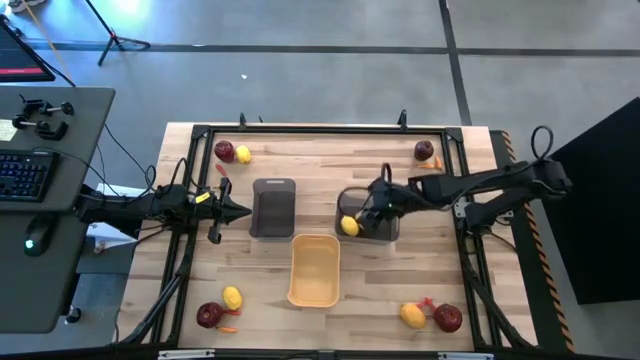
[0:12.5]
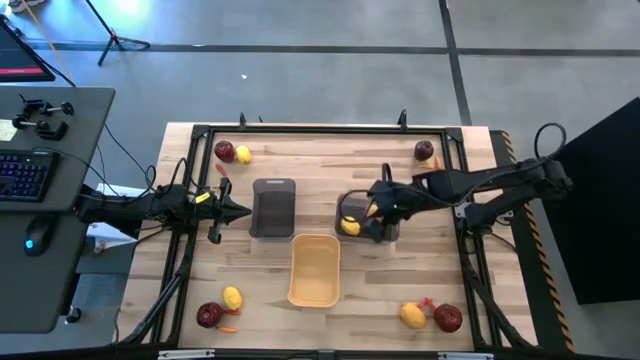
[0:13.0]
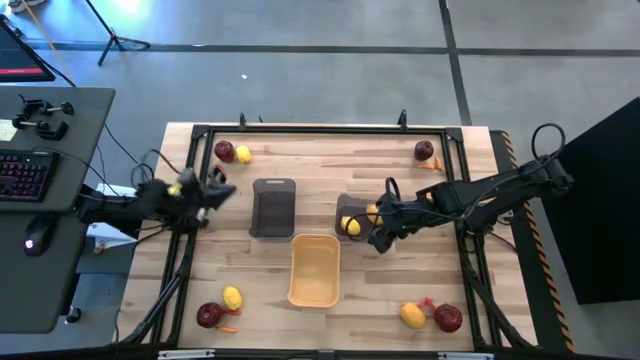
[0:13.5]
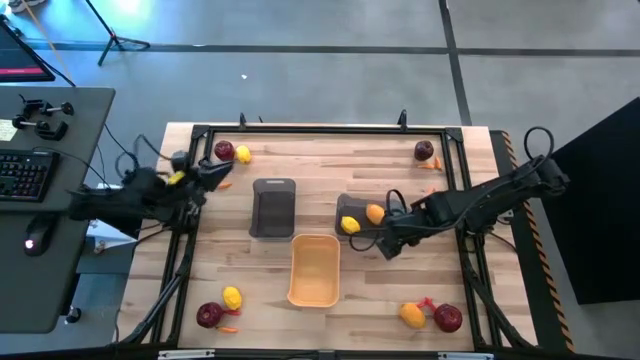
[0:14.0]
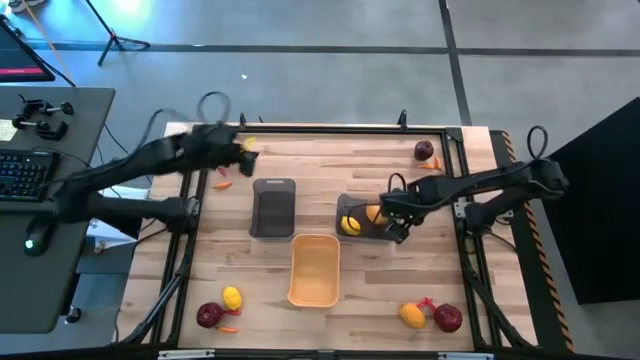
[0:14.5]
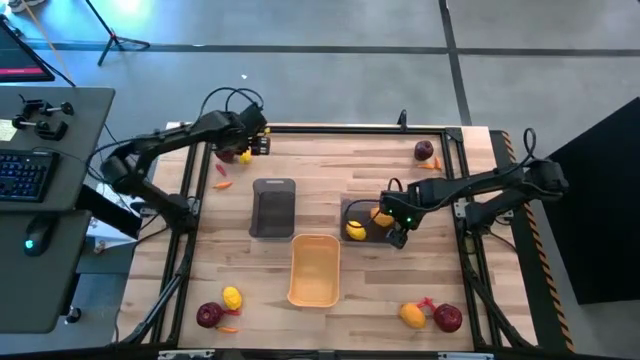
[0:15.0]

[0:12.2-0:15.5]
Task: Sort produce into baskets
Adjust the right black bin

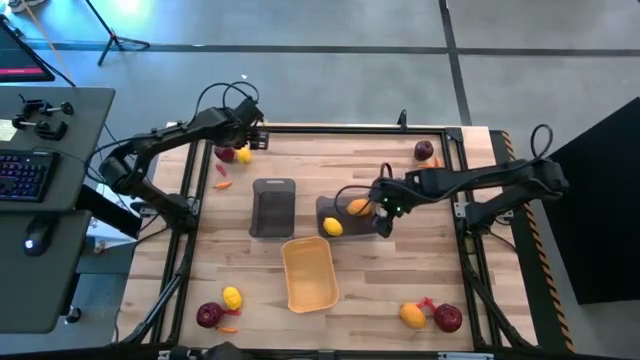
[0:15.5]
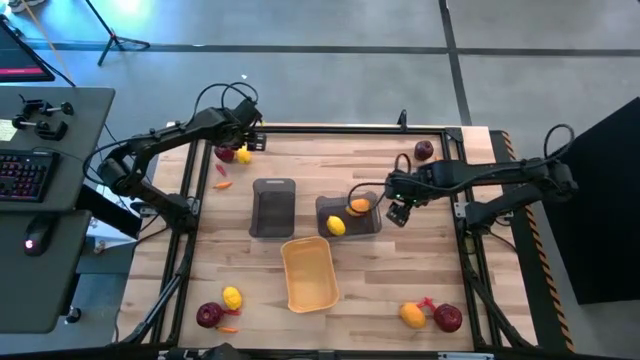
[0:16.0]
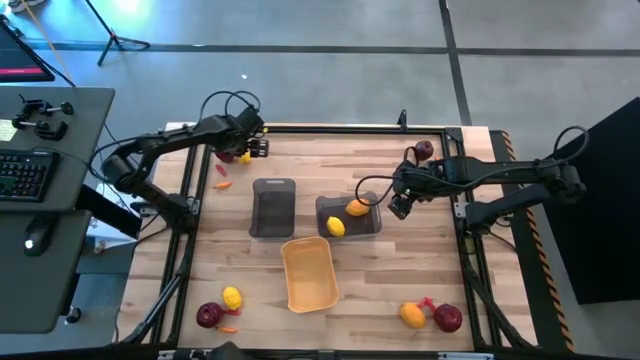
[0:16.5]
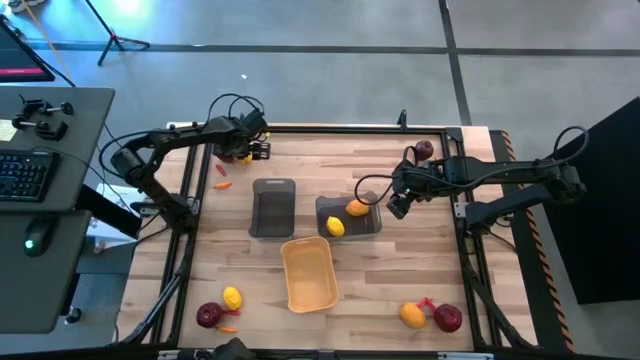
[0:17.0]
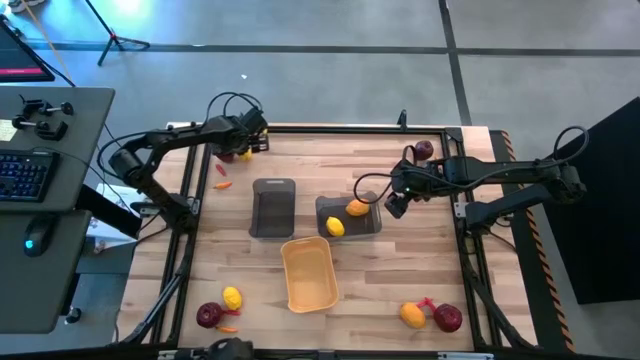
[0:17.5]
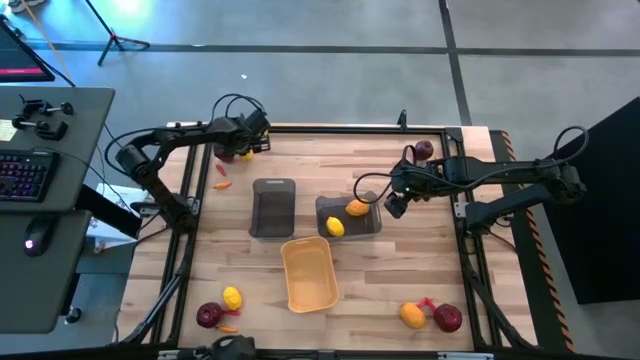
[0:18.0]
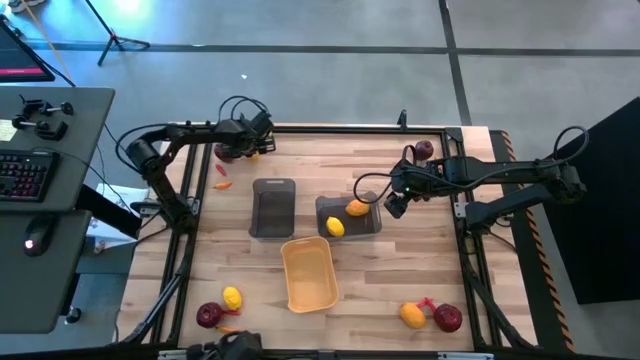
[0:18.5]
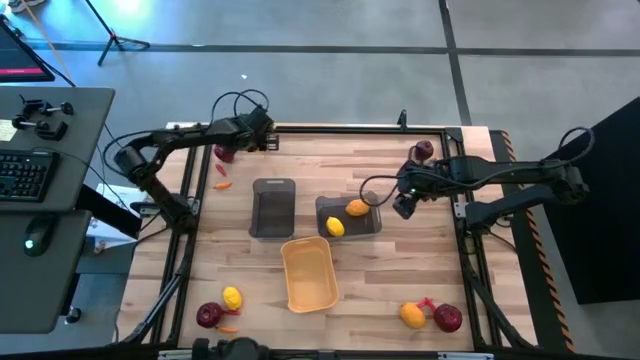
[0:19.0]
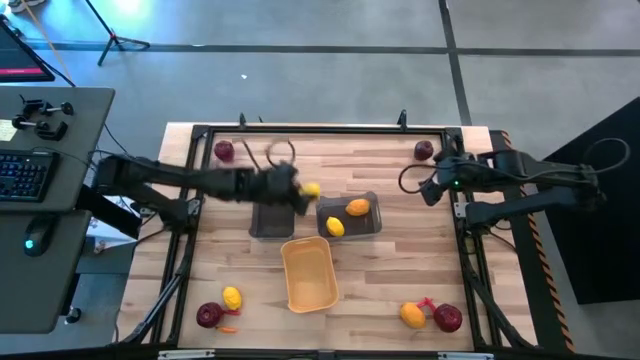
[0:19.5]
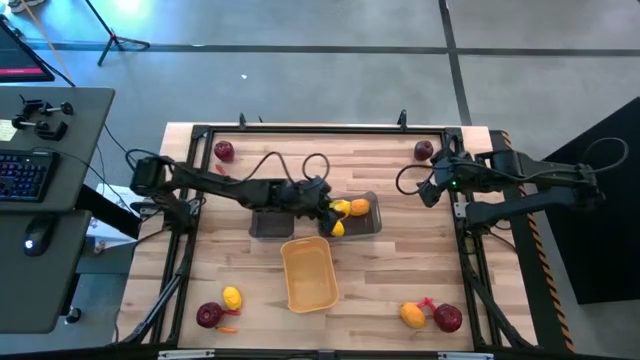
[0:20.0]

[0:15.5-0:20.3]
Put the lemon into the right black bin

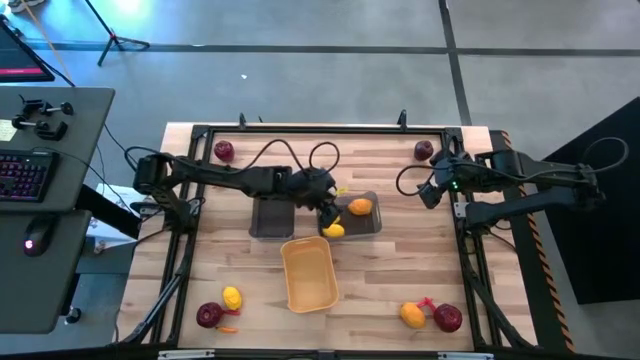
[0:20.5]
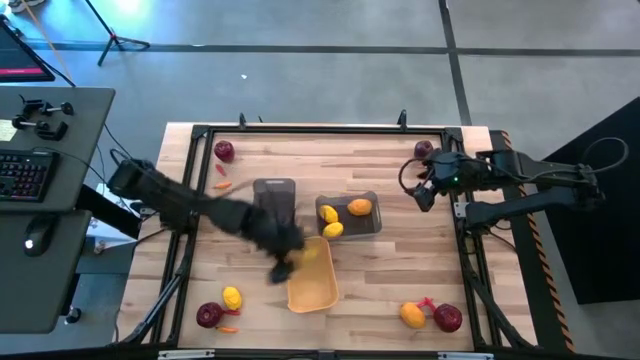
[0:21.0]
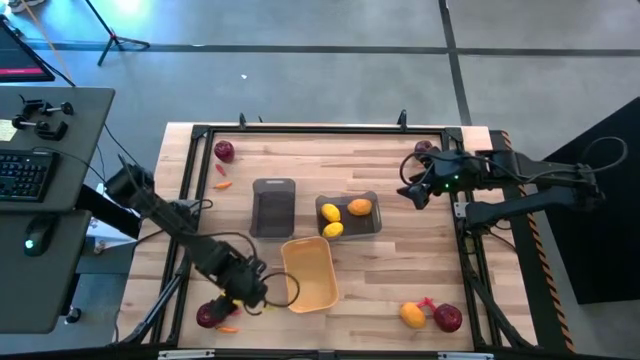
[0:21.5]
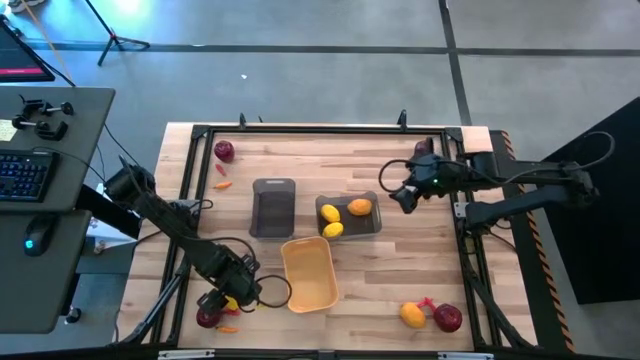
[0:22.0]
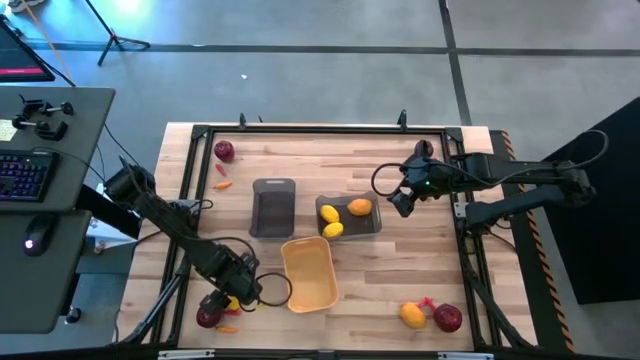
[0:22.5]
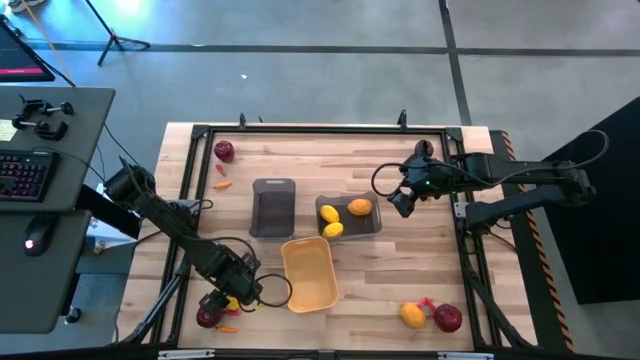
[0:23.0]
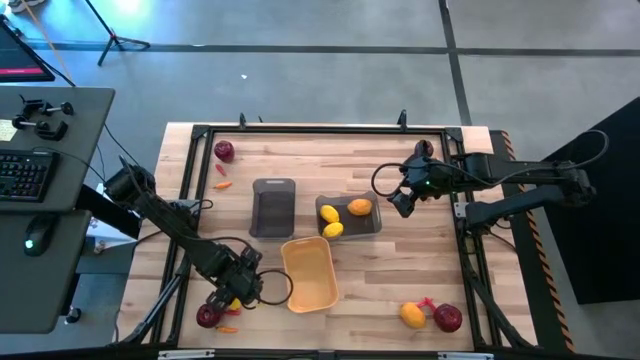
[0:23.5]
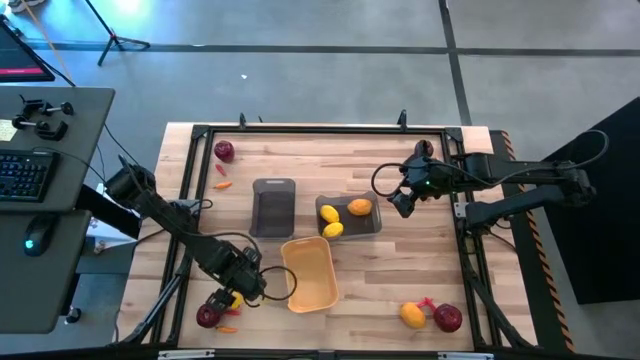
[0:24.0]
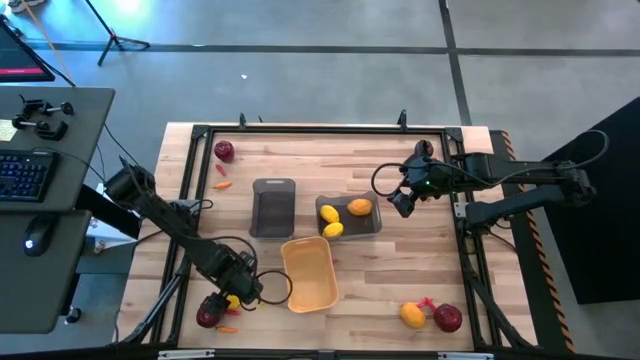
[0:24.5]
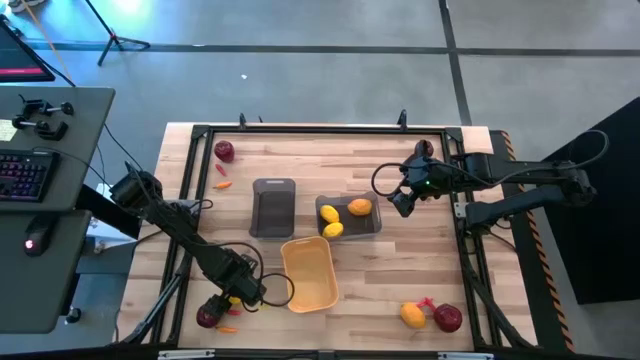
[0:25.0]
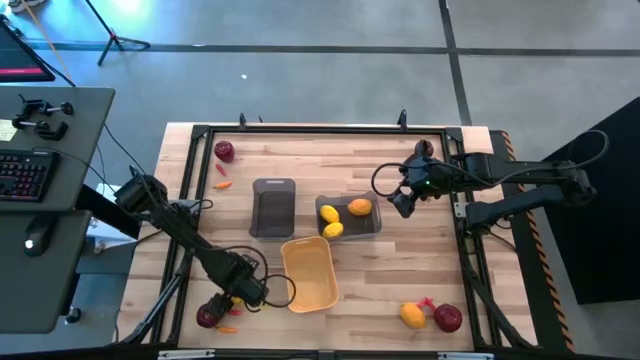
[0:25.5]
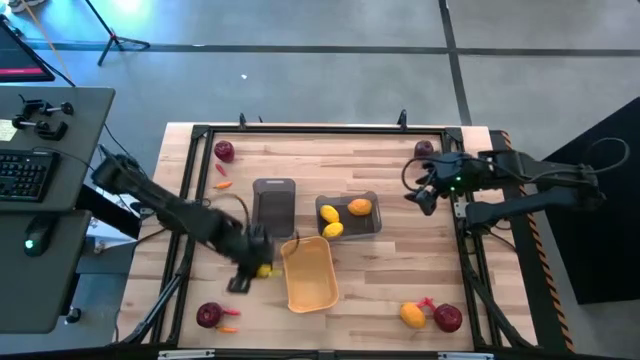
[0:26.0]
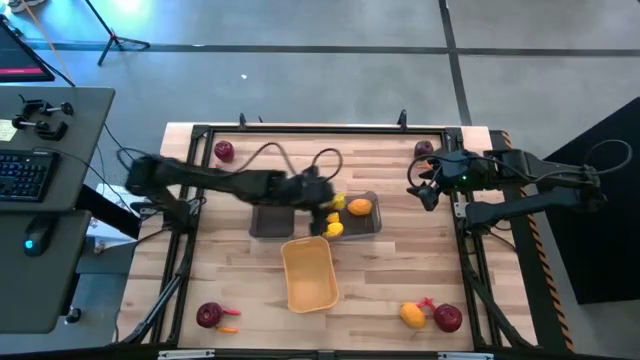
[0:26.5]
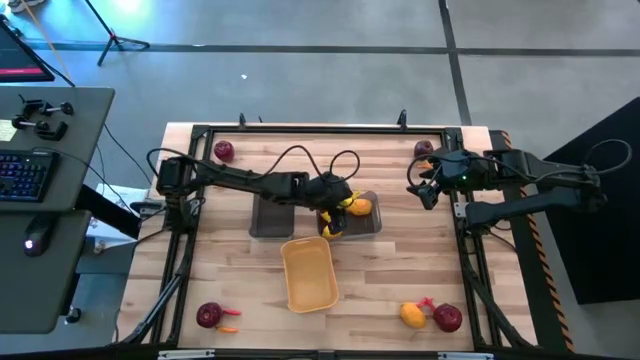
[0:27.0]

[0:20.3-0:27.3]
Put the lemon into the right black bin

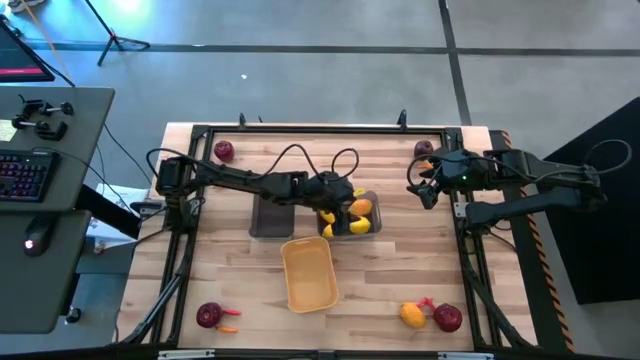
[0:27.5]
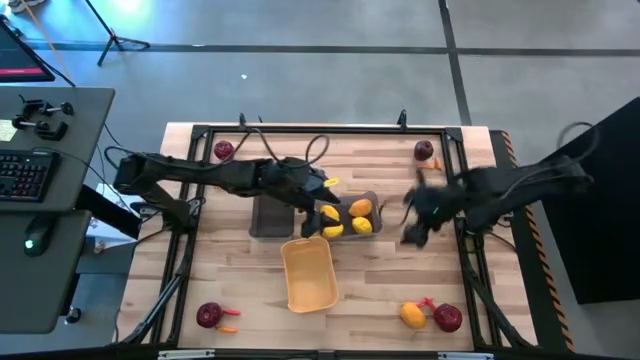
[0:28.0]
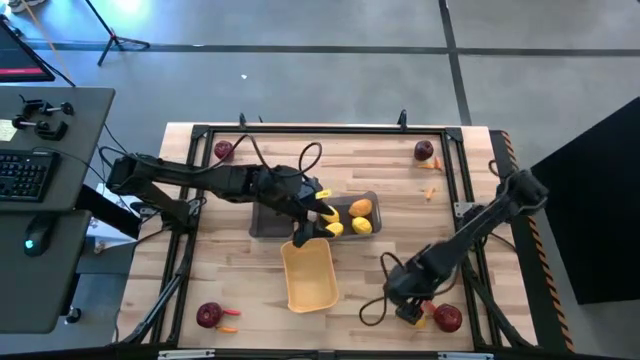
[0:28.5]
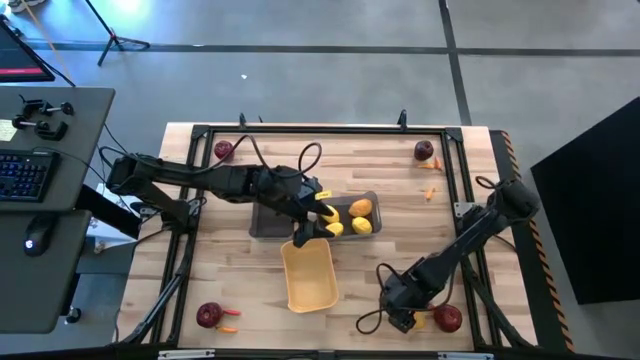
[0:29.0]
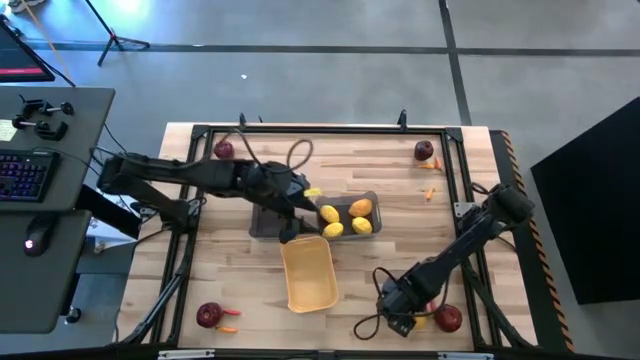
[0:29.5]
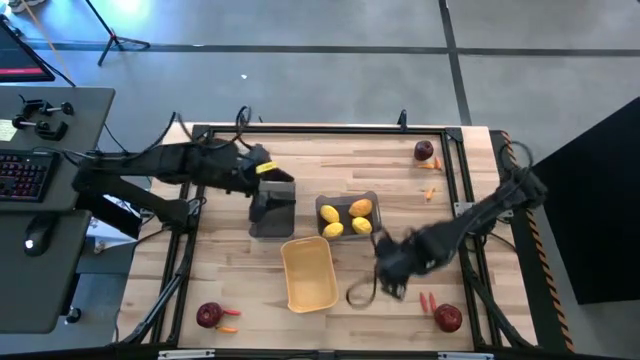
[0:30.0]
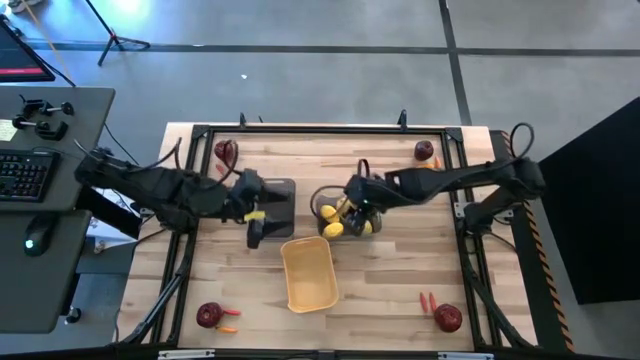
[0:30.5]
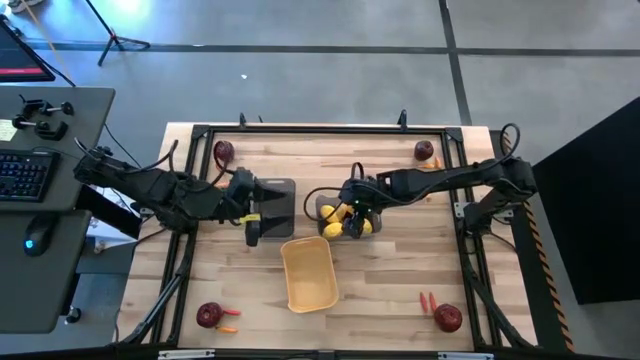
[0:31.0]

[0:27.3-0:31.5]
Put the lemon into the right black bin

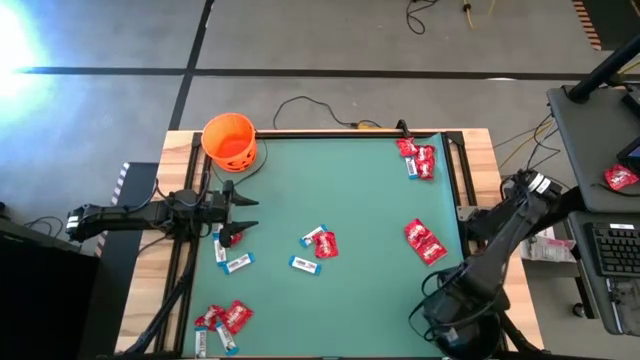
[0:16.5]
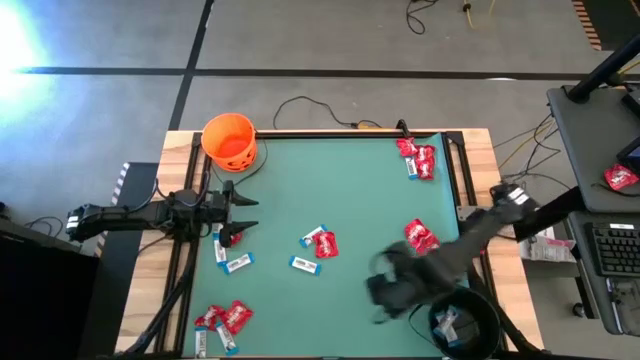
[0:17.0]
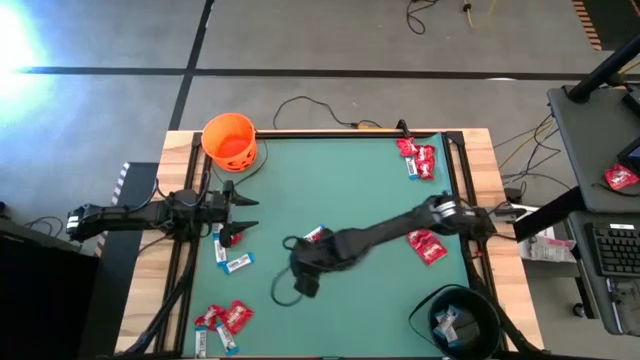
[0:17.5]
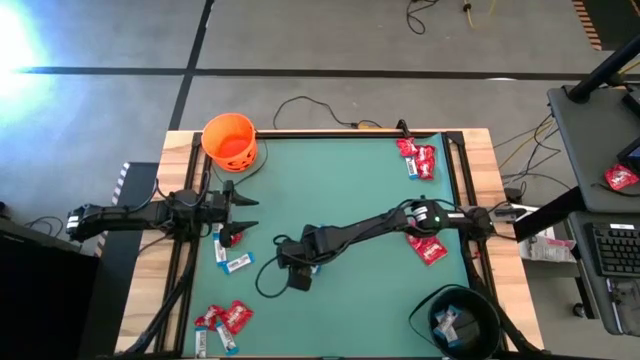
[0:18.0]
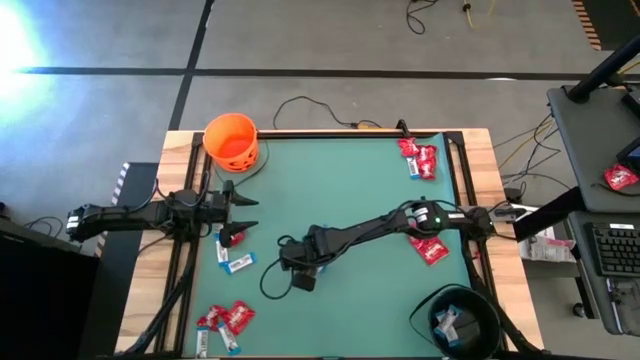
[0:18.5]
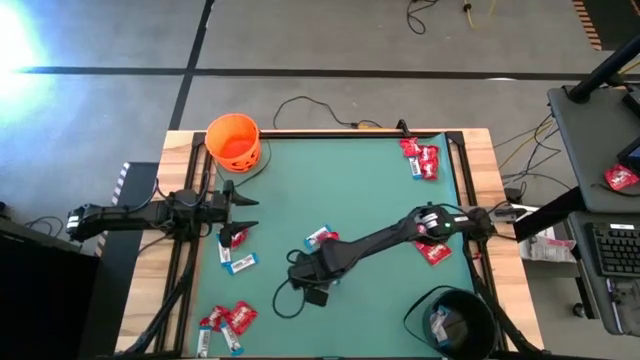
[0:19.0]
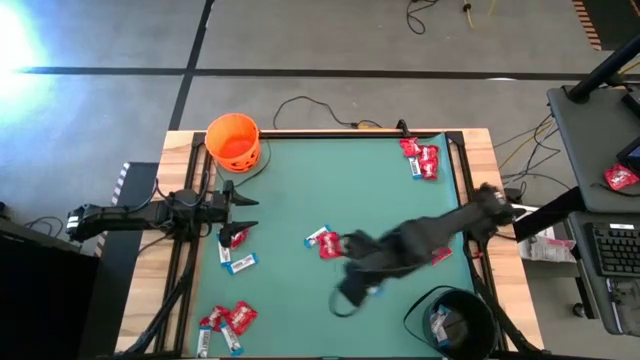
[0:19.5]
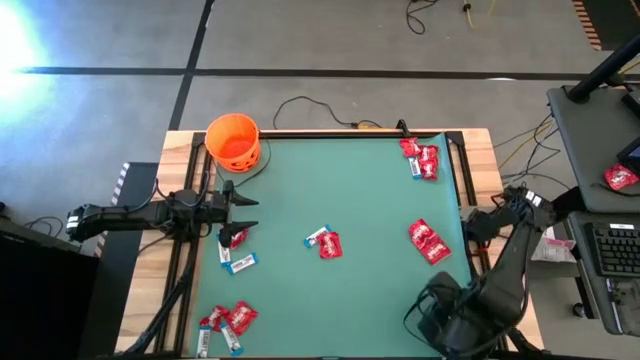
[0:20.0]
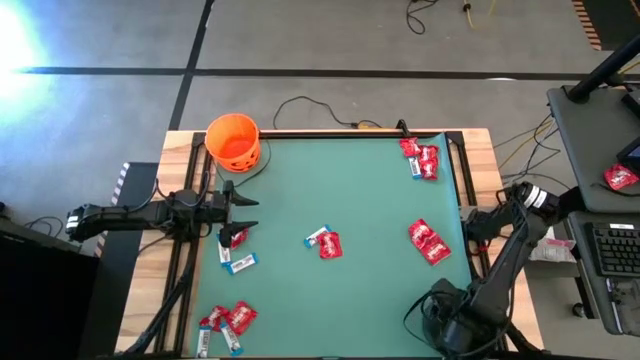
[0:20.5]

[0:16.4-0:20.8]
Task: Sort candy by brand, put in halloween buckets
Put the white chocolate into the black bucket
